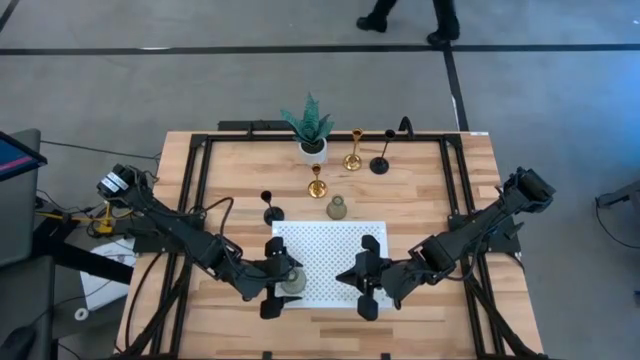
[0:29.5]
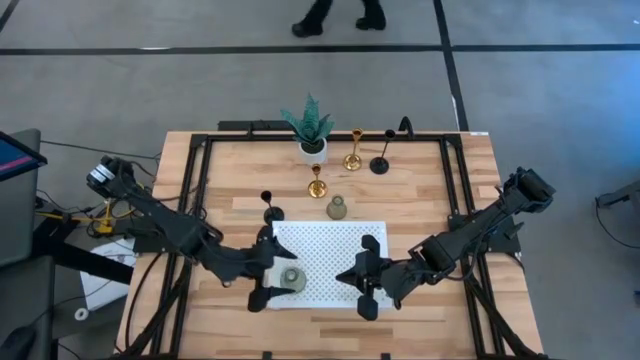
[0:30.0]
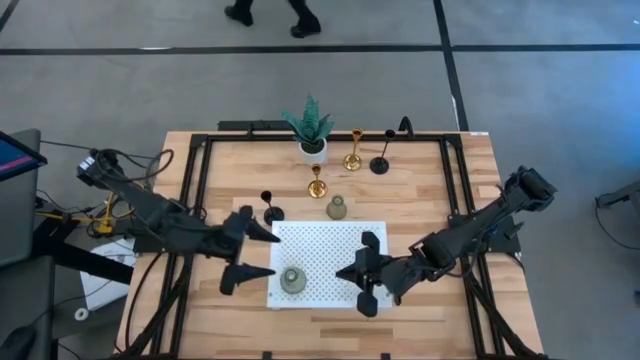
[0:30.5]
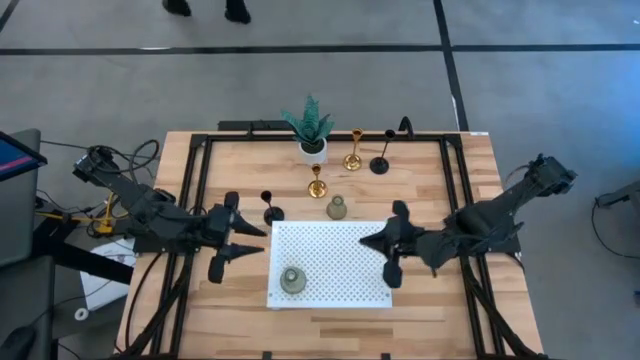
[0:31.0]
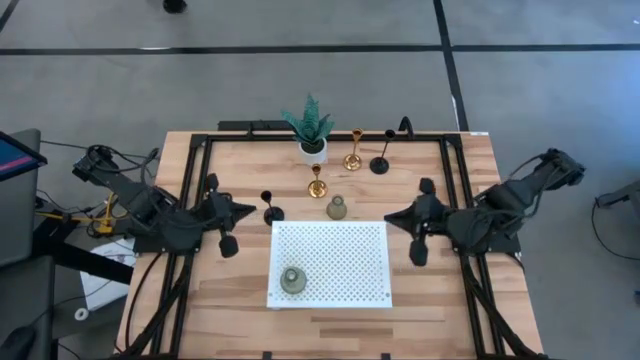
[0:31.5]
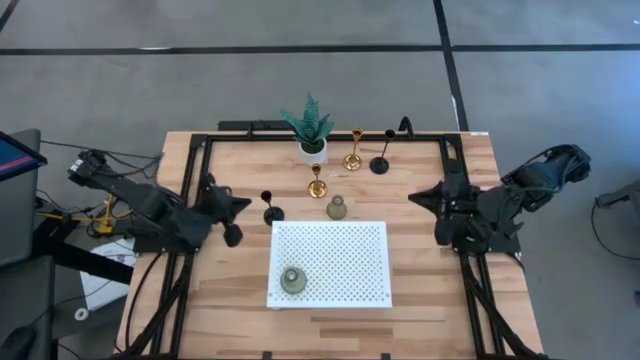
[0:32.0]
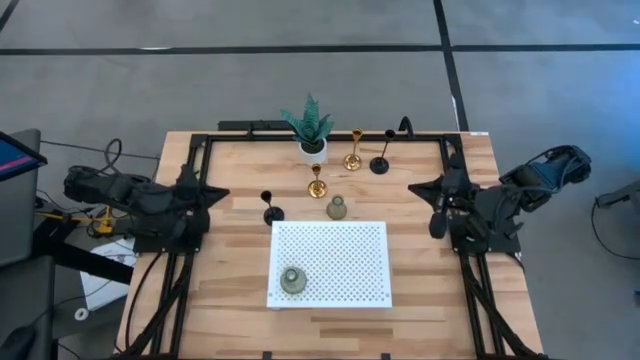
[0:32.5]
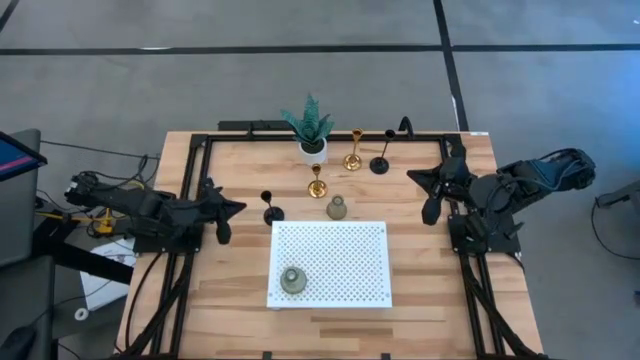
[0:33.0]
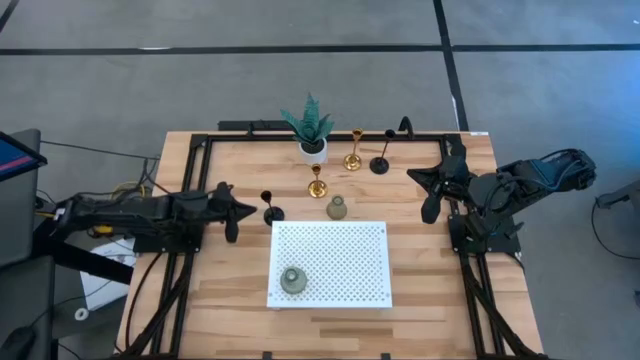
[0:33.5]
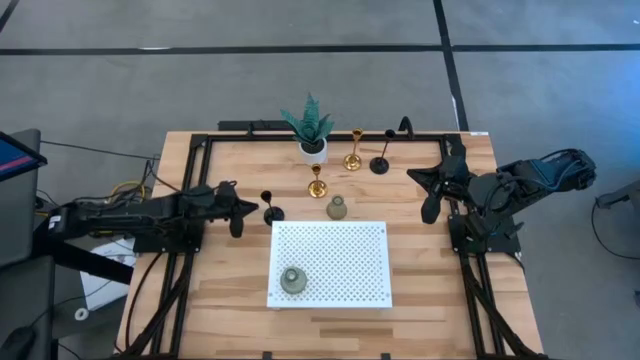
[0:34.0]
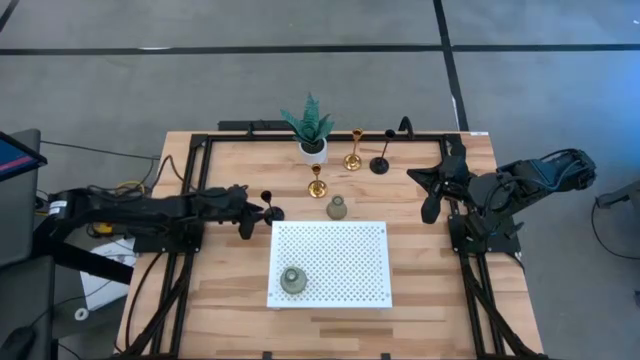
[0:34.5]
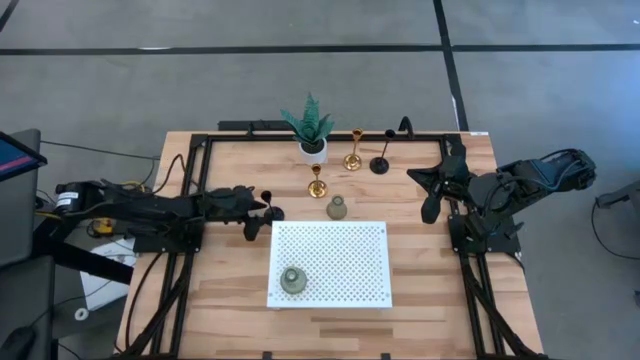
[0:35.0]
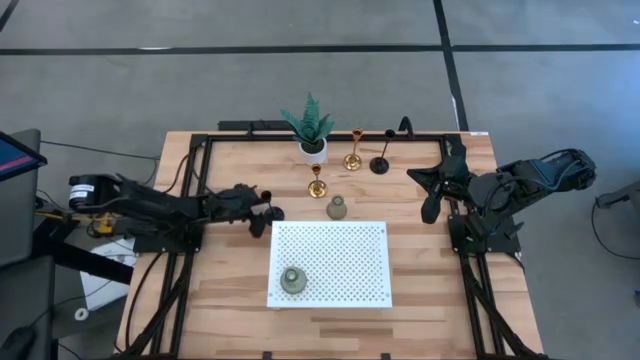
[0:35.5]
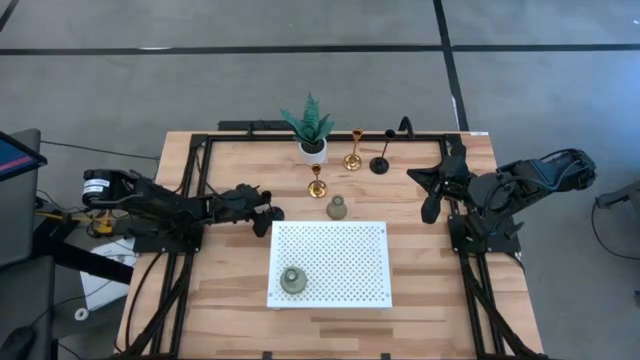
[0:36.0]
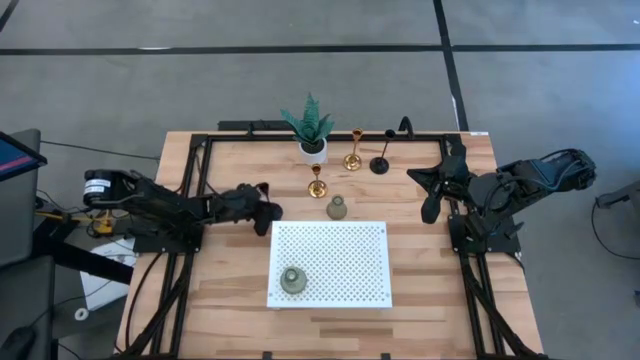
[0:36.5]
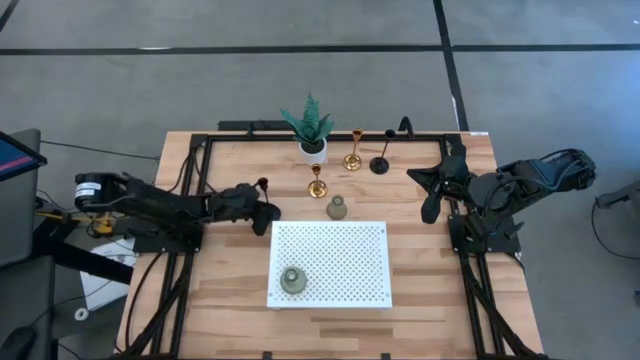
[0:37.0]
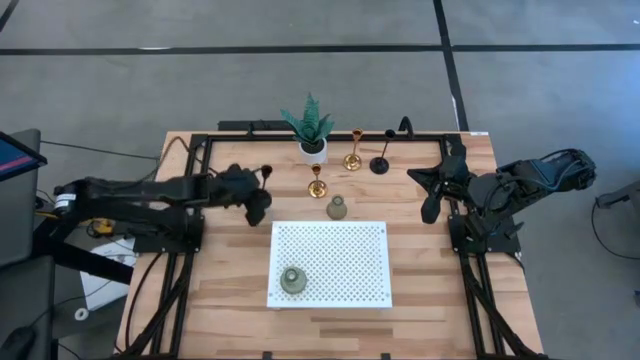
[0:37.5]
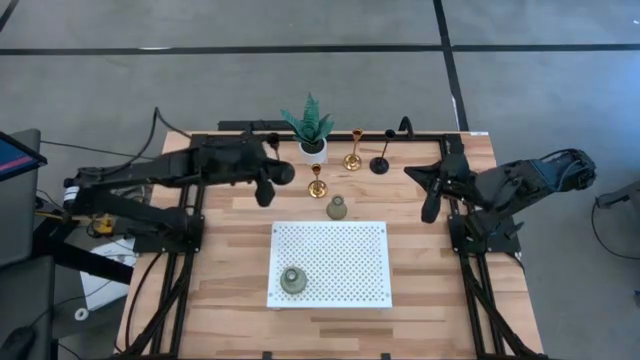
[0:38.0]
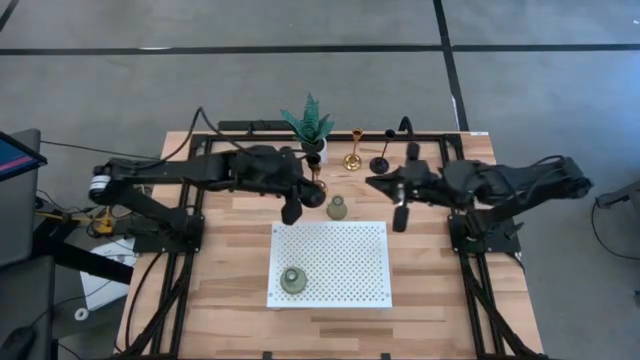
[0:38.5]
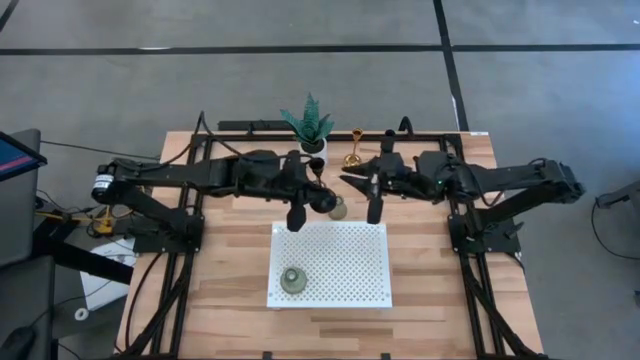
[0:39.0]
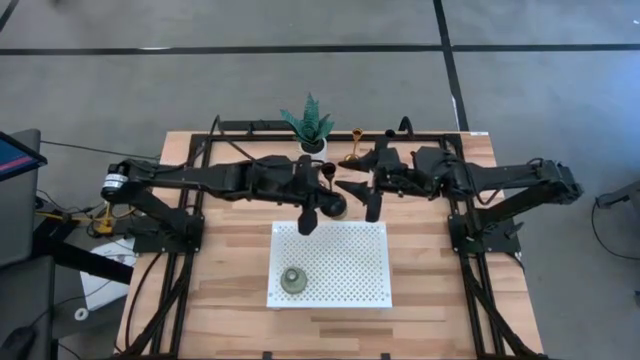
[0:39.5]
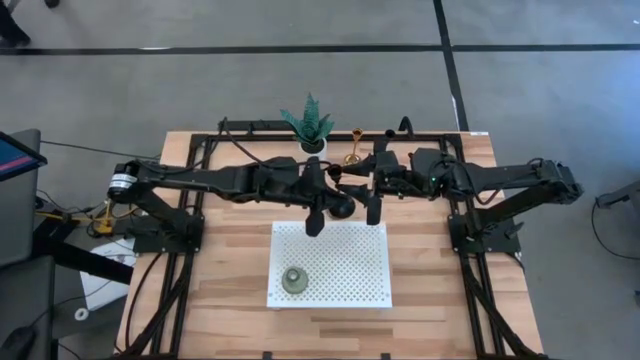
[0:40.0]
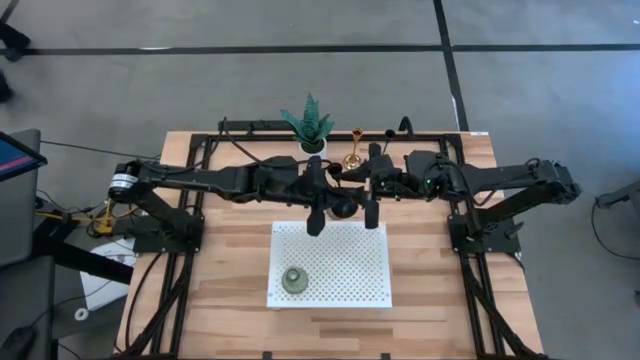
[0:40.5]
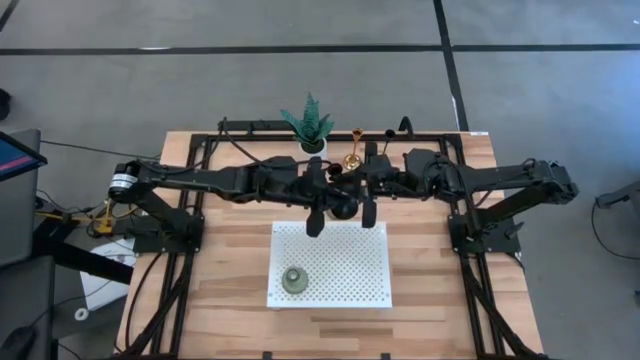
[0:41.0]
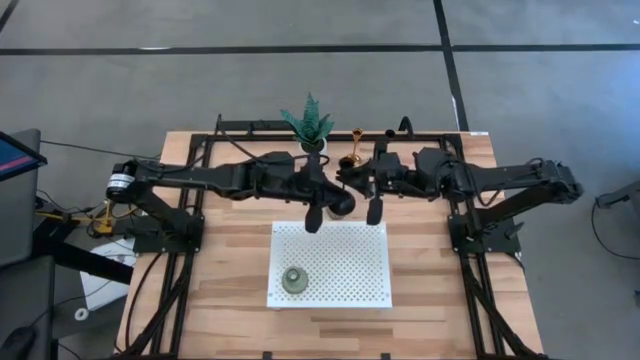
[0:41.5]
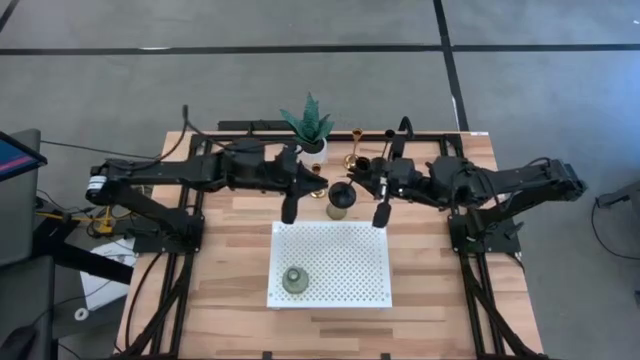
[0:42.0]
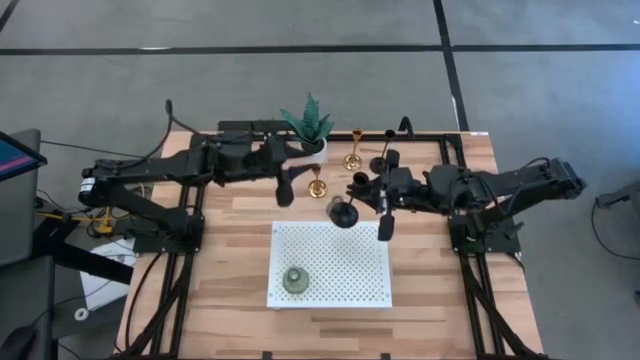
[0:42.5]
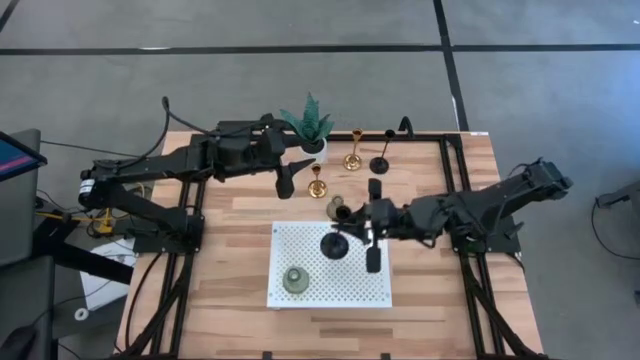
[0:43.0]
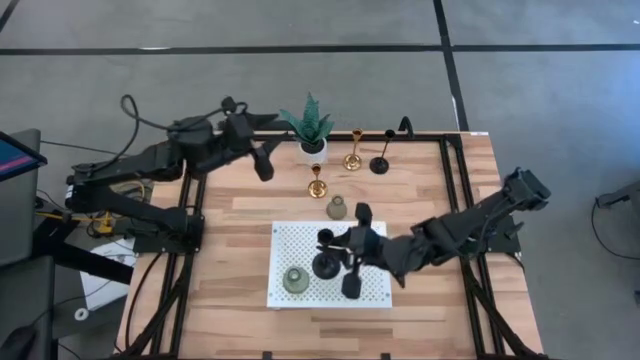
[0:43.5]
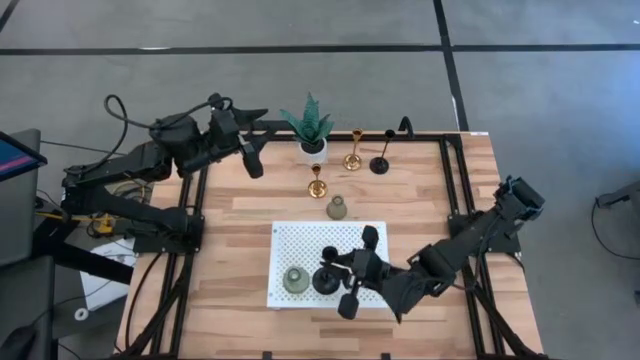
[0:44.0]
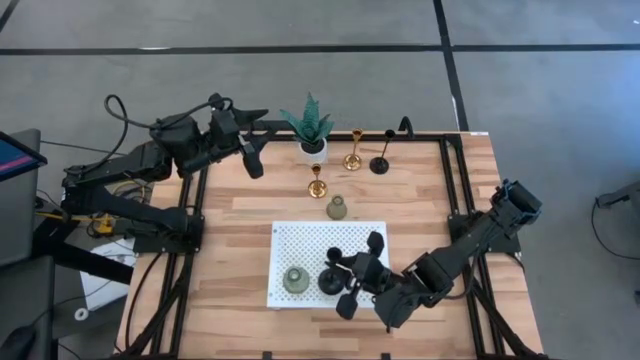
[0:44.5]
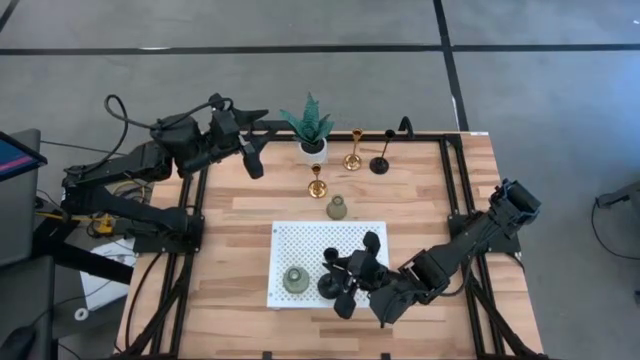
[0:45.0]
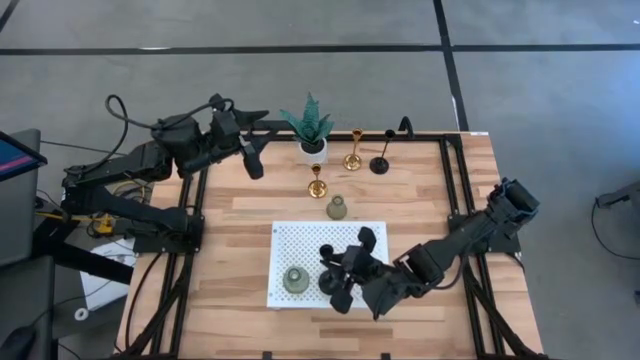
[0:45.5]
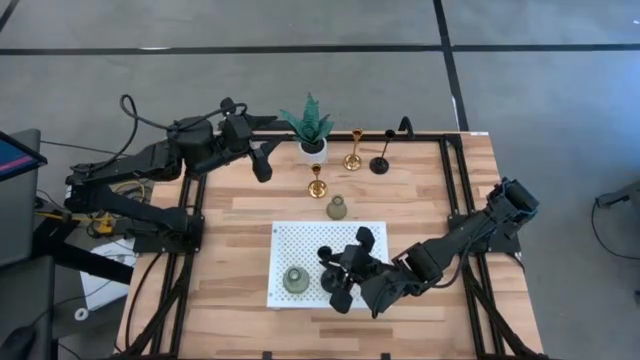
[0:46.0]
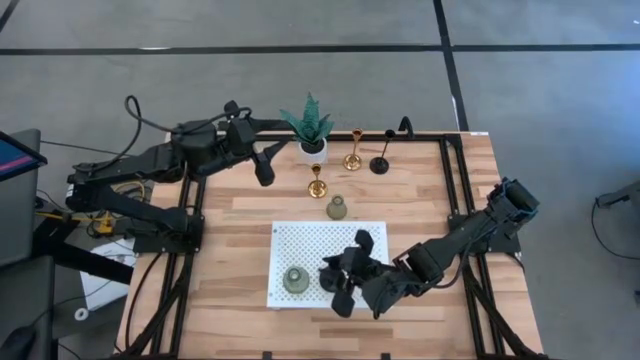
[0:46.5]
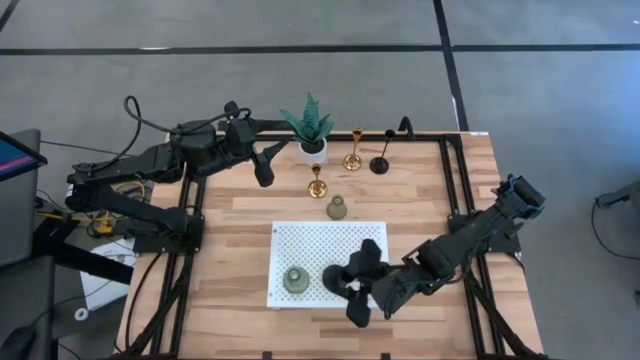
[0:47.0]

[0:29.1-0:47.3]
Task: Pick & Place candle stick holders
Put the bottom black candle holder on the shelf

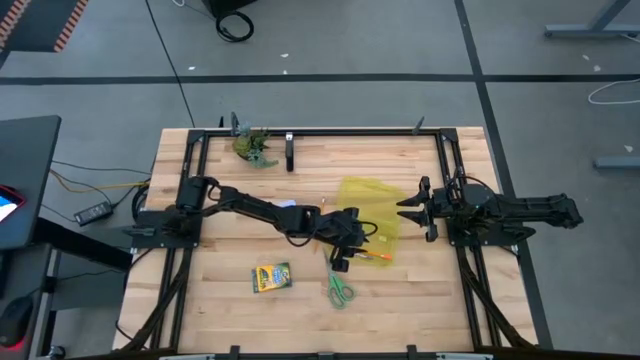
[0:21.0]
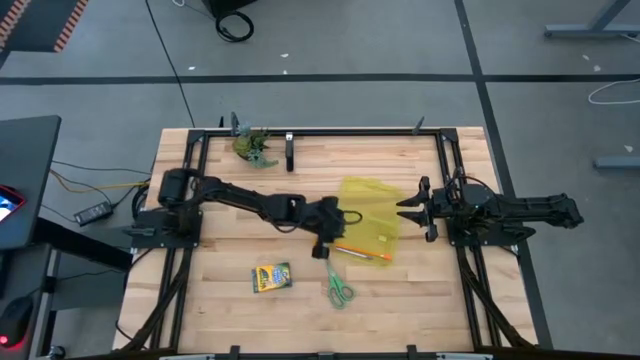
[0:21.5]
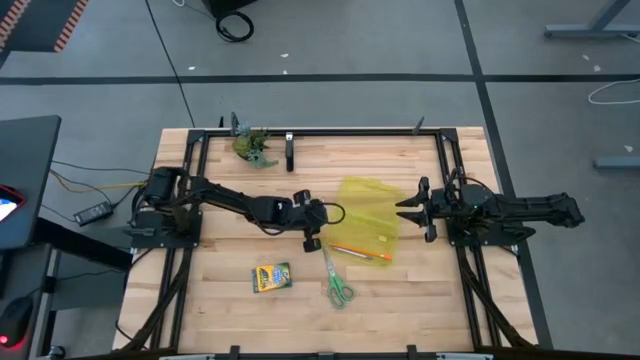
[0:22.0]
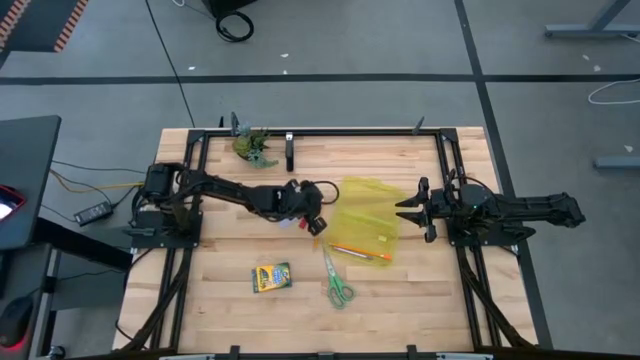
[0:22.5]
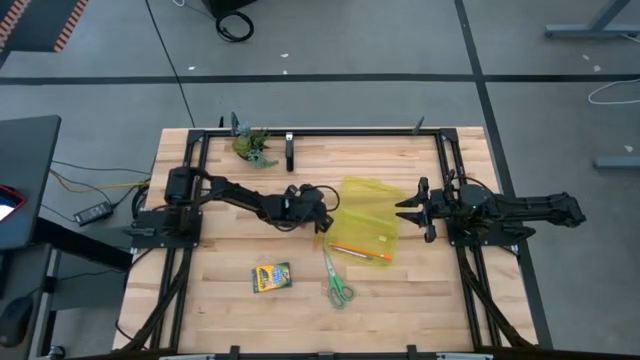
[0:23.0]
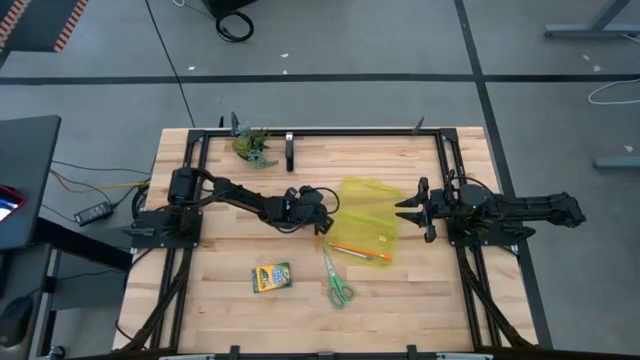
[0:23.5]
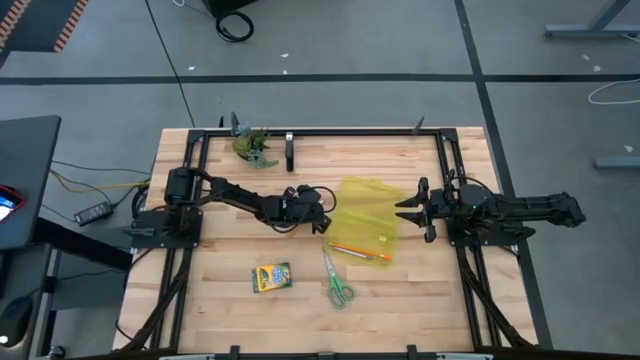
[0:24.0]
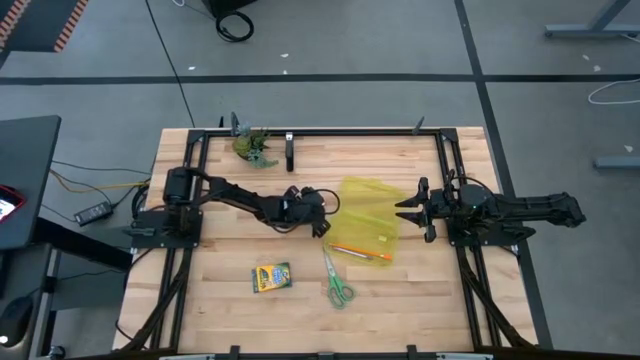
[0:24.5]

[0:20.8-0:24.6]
Task: Pack school essentials
Put the orange pencil into the yellow supply box
